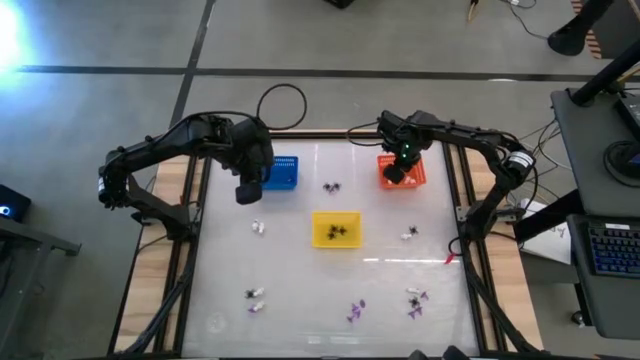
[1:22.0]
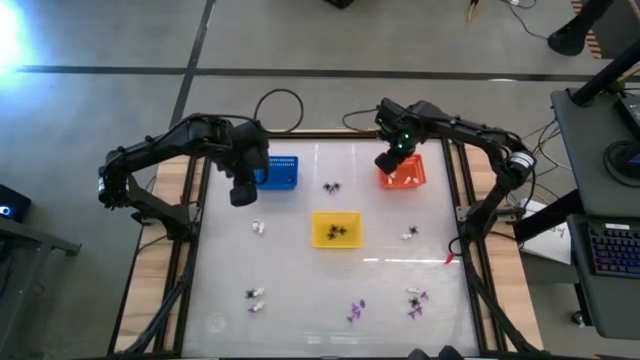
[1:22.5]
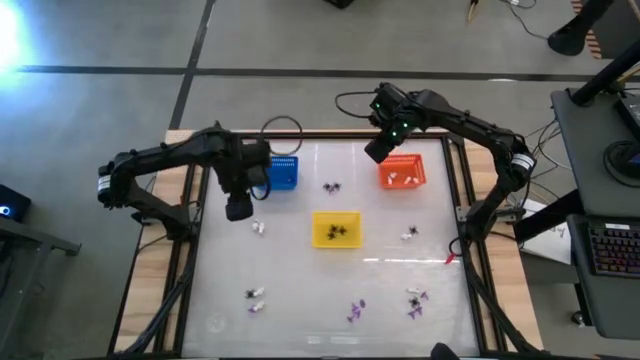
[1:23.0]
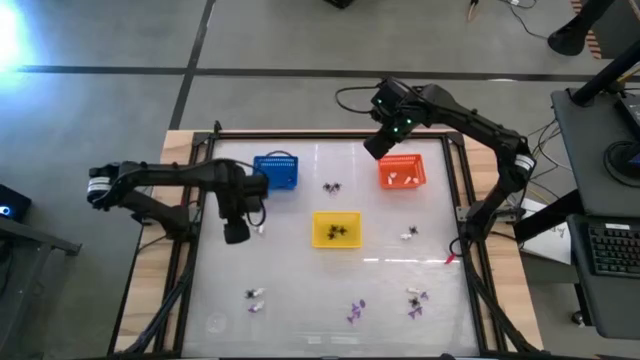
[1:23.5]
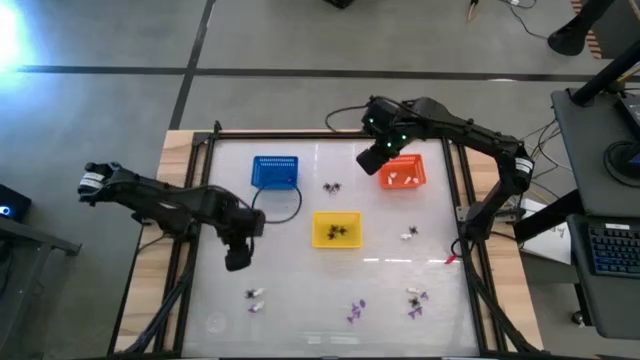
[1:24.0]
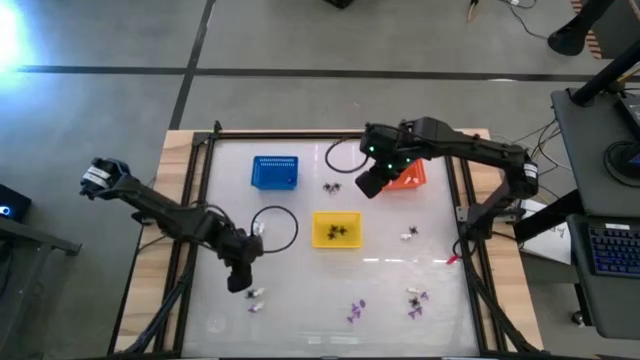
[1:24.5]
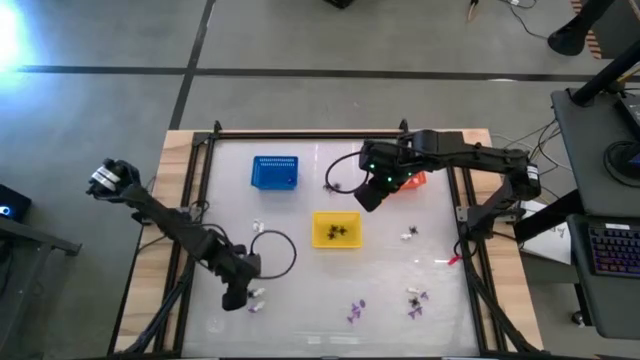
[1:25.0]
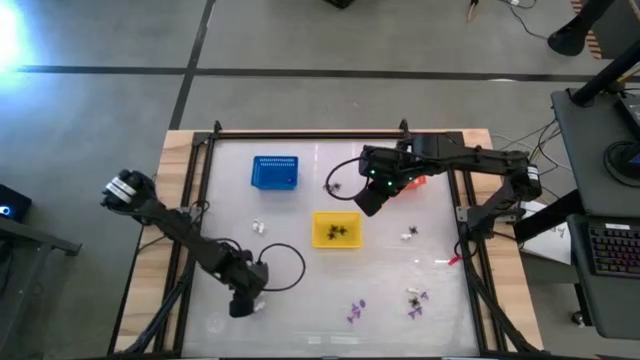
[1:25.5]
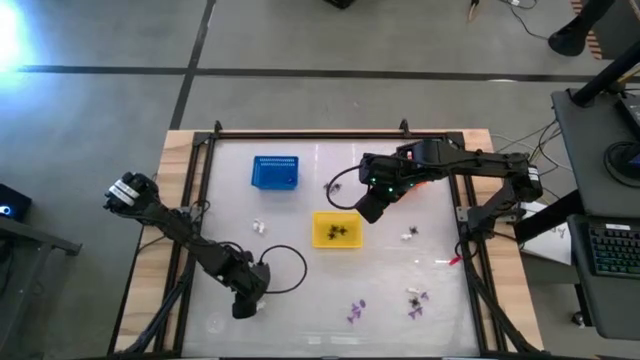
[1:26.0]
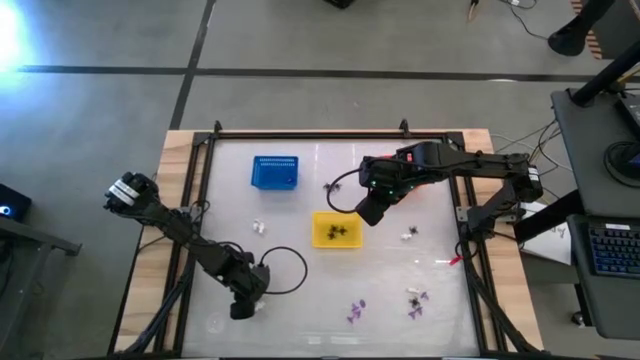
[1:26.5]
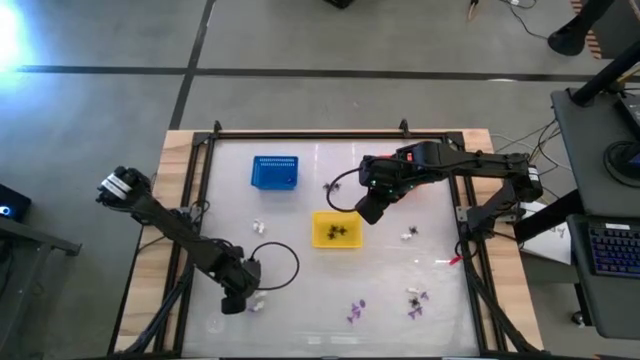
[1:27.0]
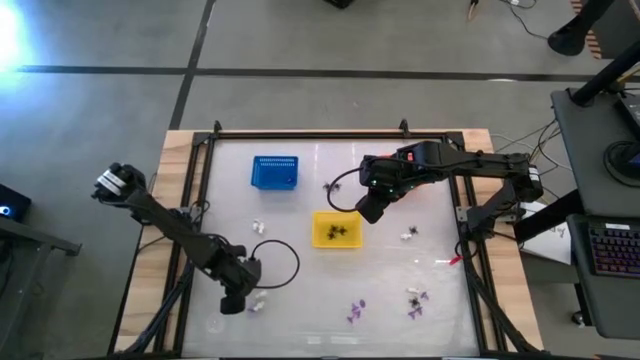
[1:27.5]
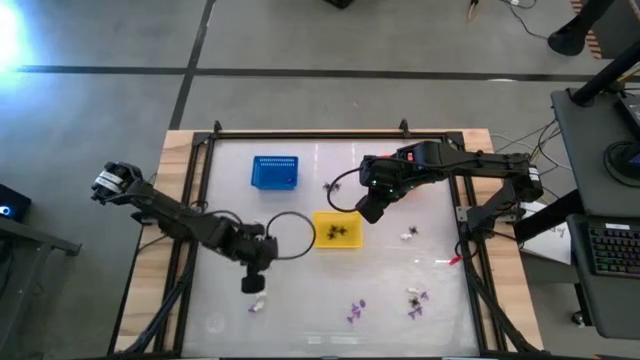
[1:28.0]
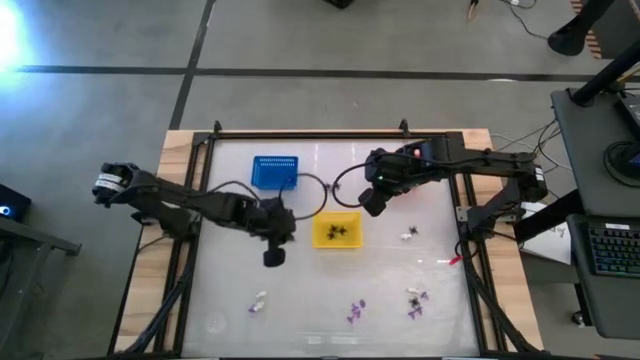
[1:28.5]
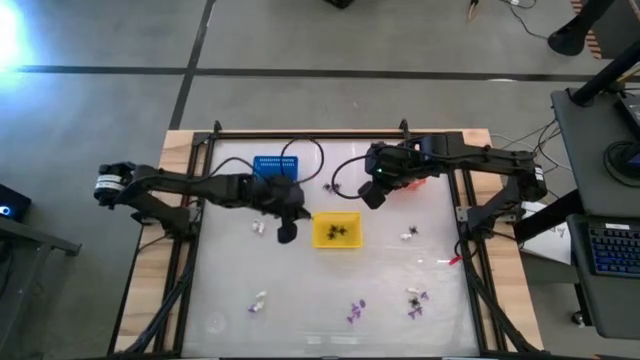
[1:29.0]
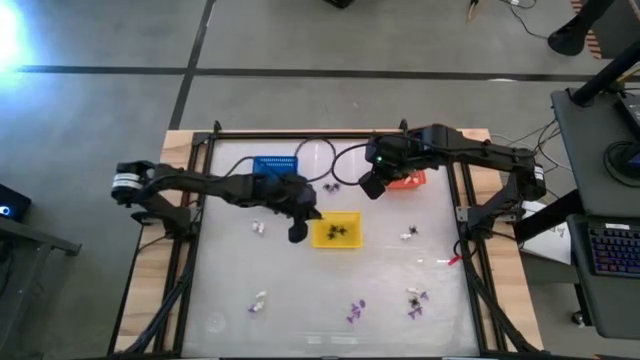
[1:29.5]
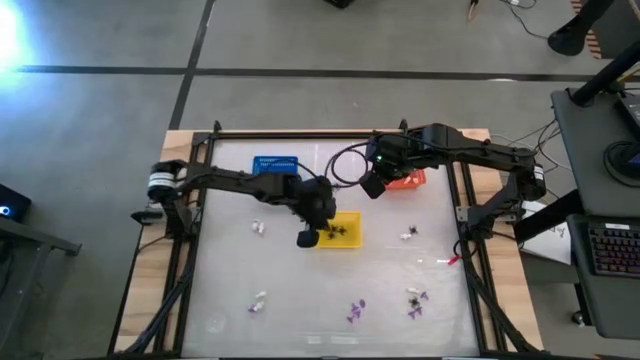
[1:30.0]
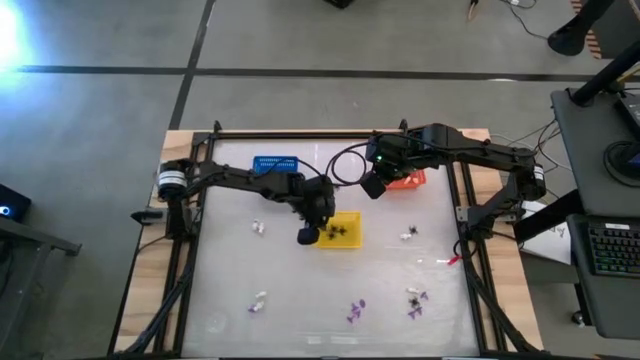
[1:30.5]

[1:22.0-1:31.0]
Task: Sort Halloween decoration
Put the black spider toy into the yellow bin

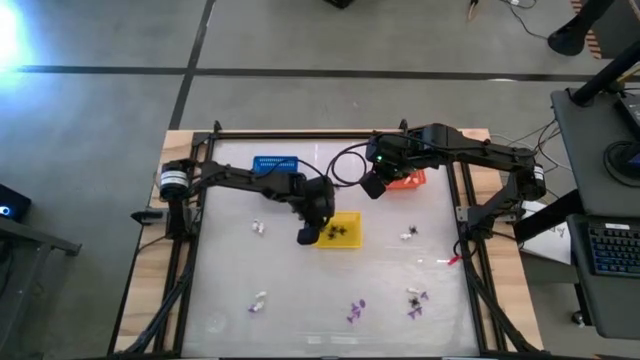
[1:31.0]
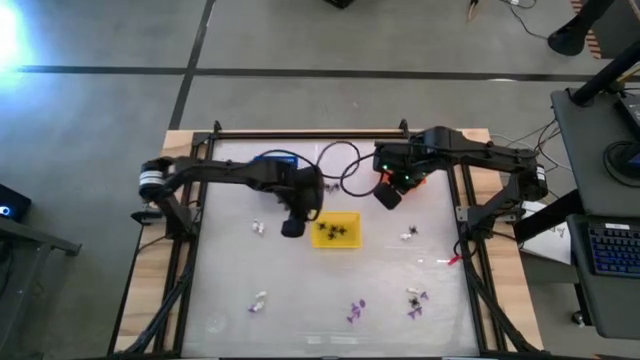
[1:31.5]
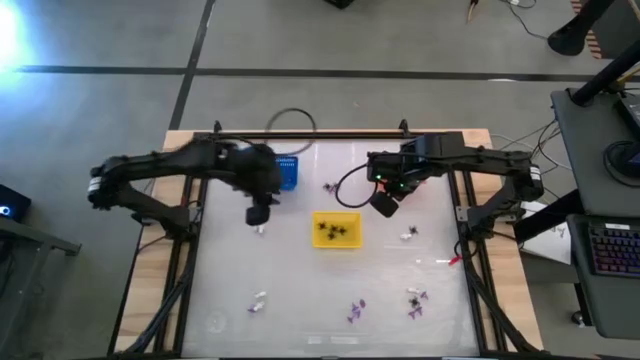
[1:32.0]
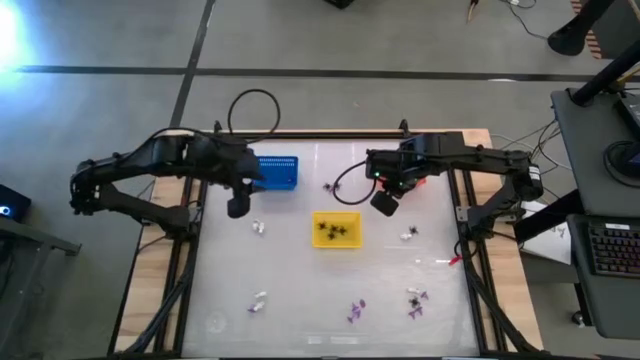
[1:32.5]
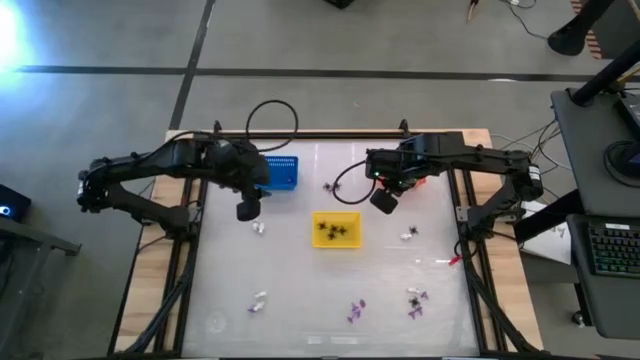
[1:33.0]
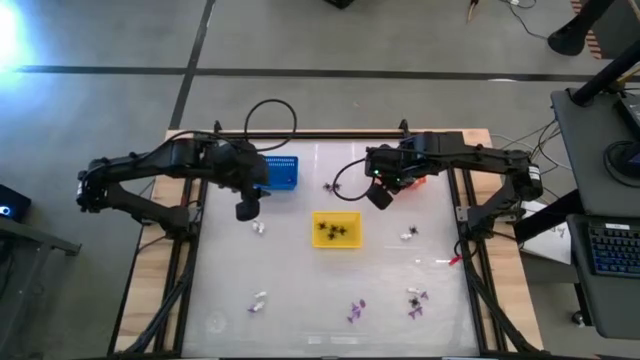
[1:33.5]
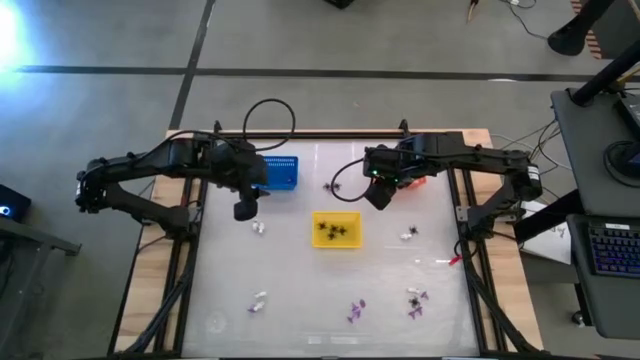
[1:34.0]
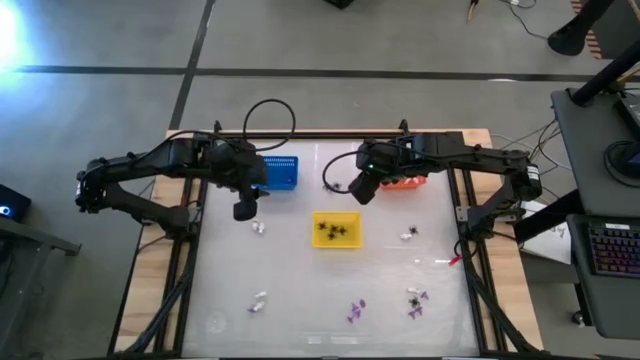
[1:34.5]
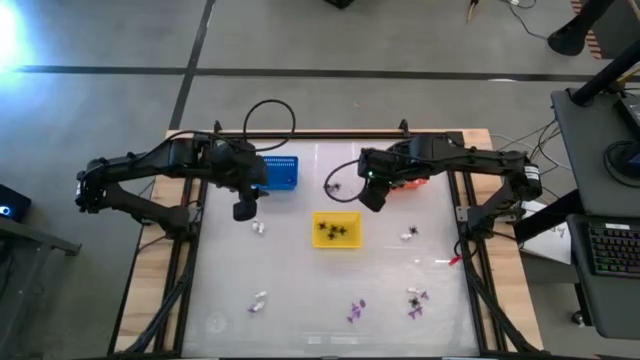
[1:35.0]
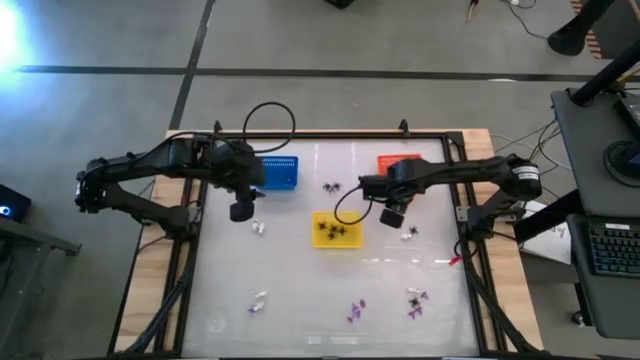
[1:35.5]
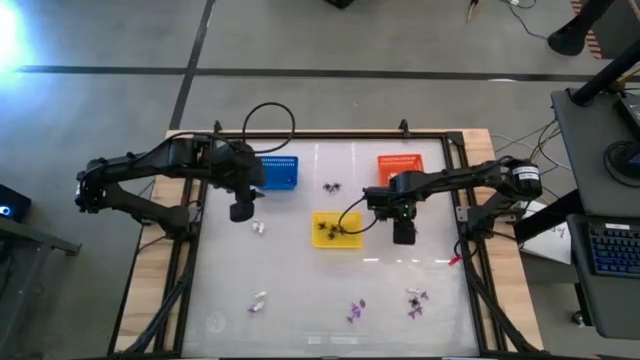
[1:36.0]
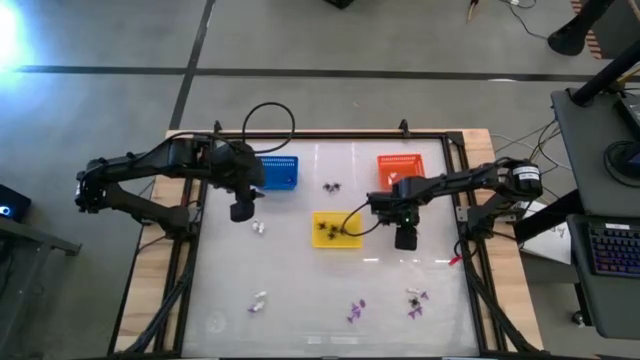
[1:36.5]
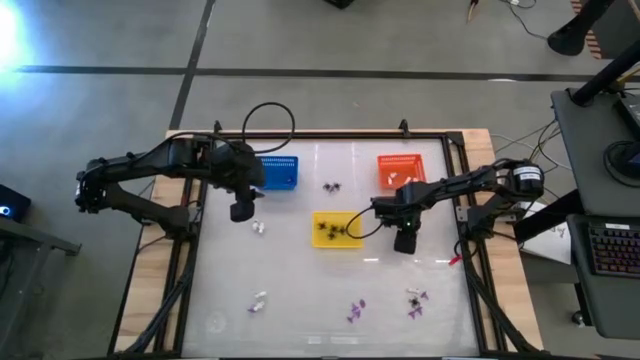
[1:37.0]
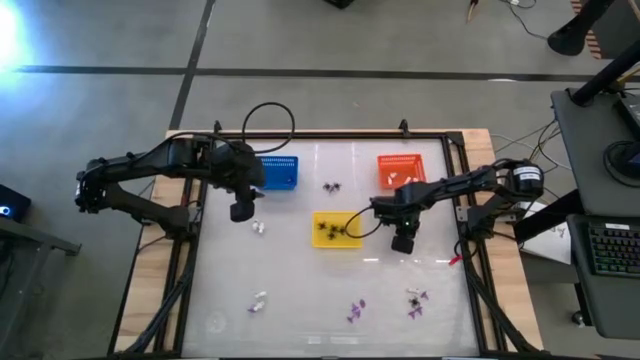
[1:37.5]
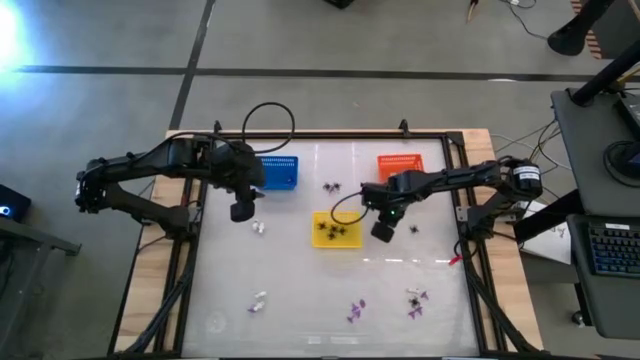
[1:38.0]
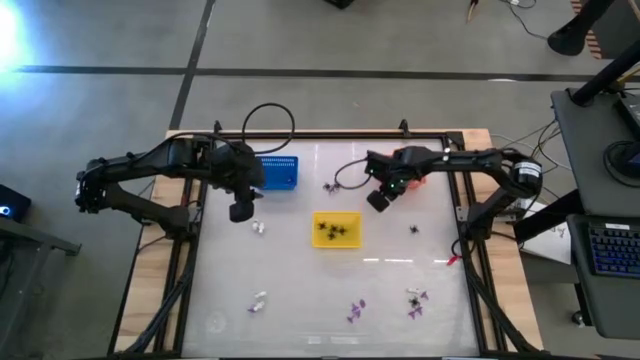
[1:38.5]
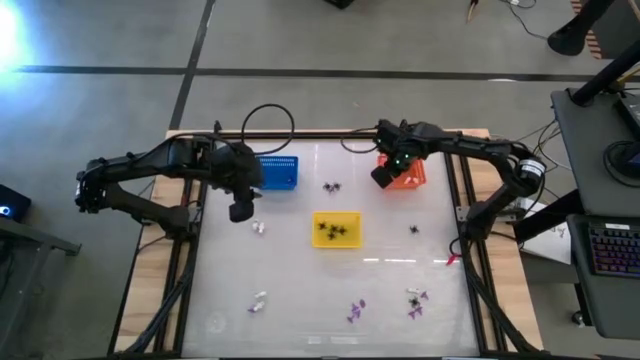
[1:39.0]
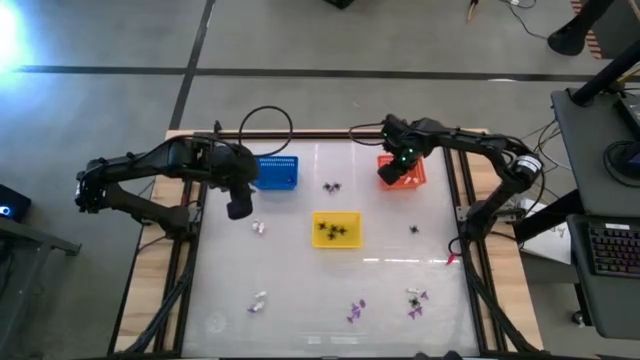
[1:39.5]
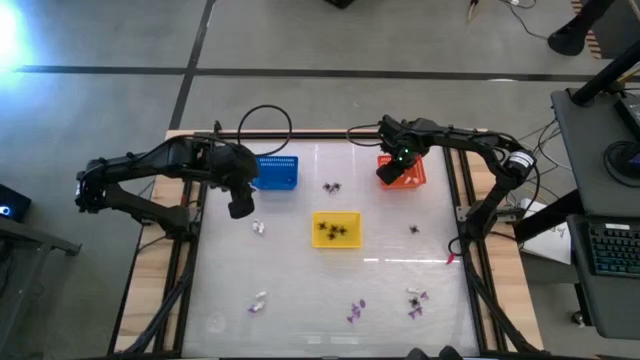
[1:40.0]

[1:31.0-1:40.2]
Put the white skeleton toy into the orange bin

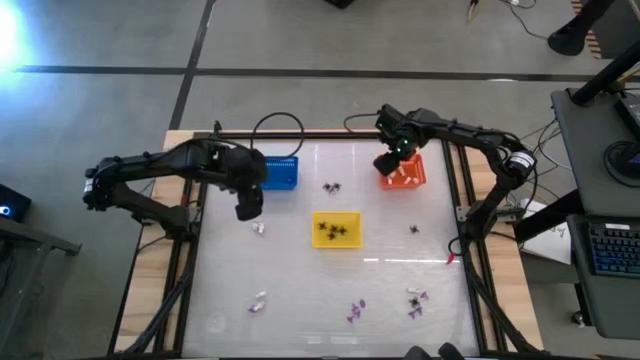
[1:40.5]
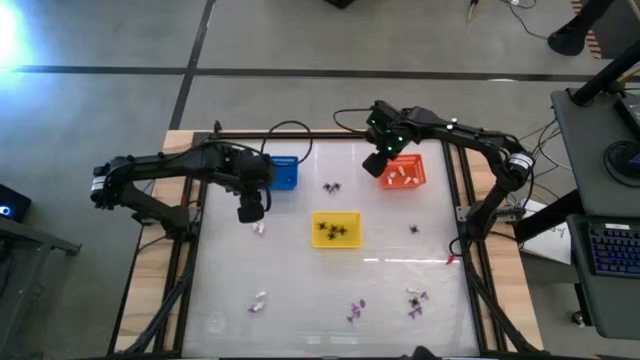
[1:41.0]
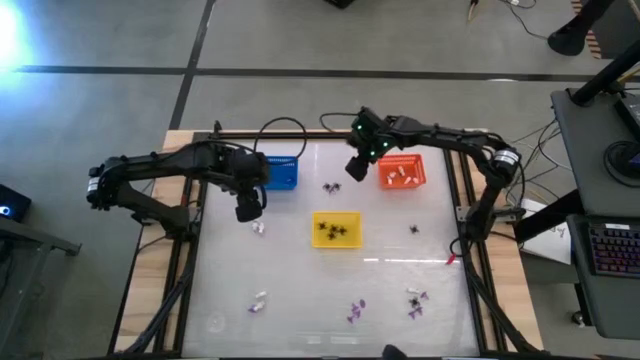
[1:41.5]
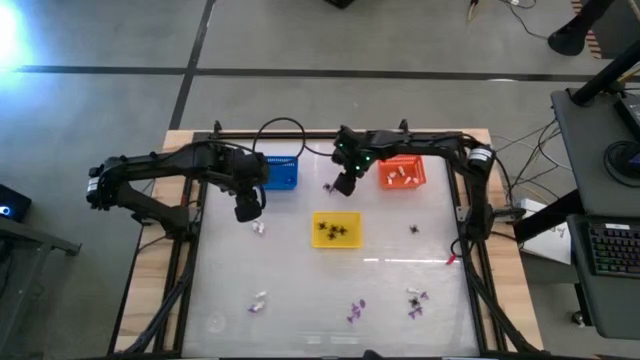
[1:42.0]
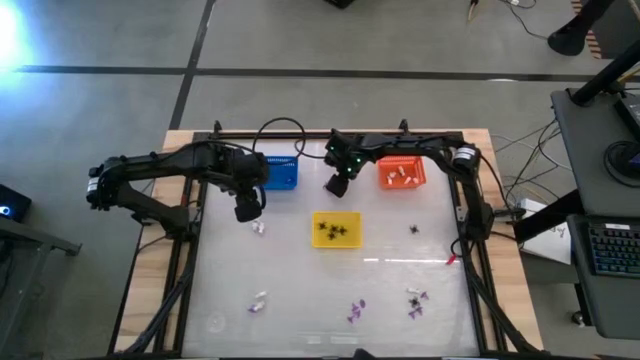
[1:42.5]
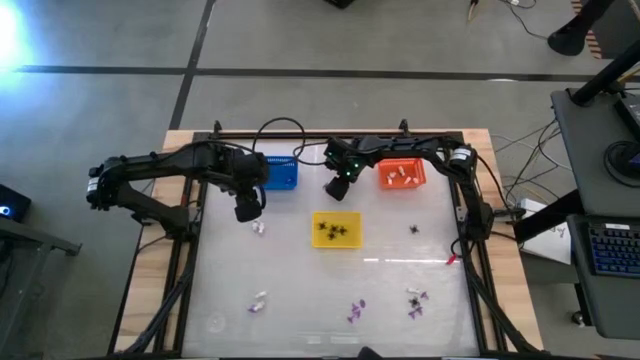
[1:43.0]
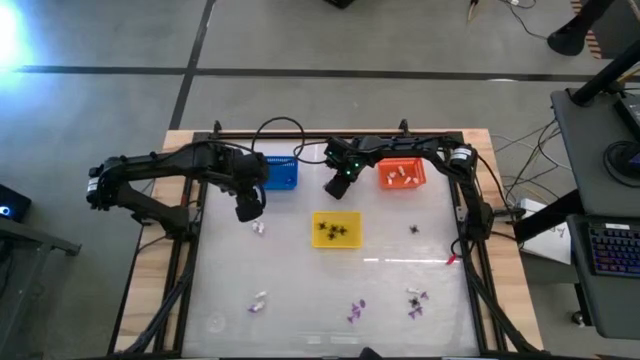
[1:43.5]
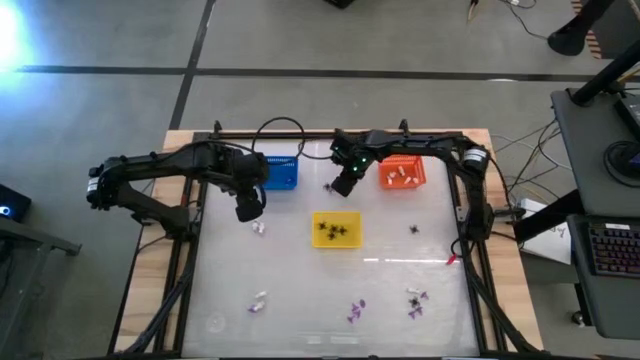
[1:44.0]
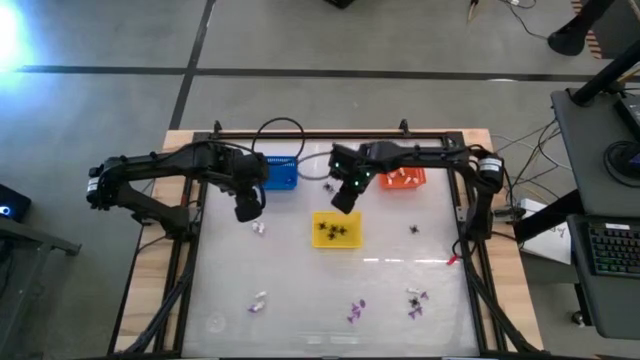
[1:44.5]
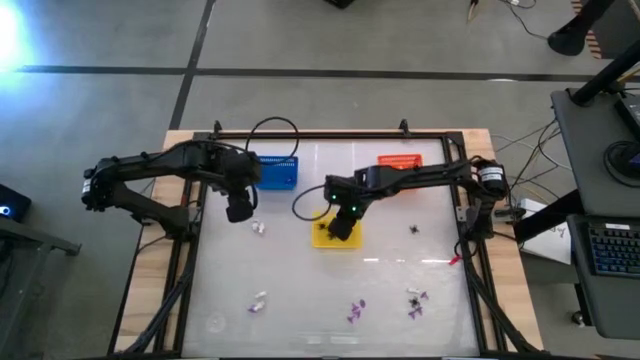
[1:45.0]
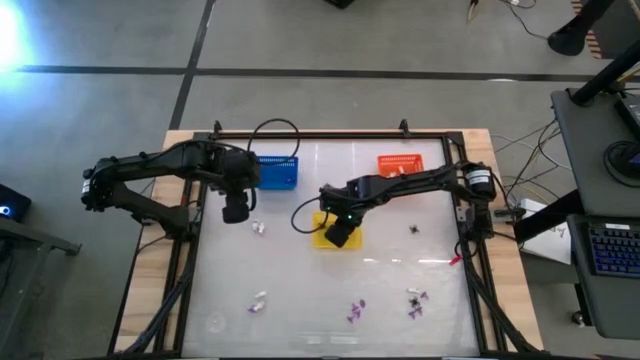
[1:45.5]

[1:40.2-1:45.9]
Put the black spider toy into the yellow bin
